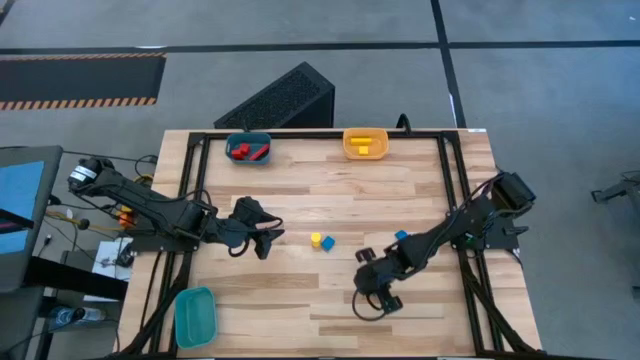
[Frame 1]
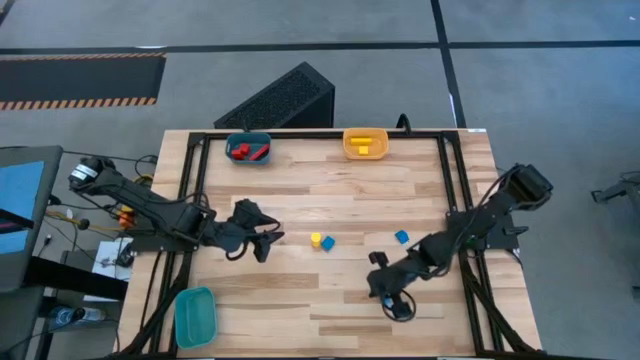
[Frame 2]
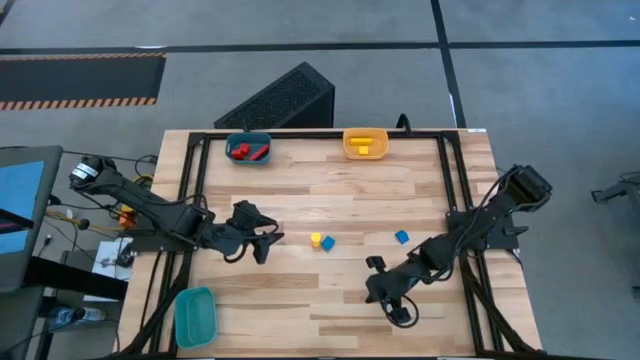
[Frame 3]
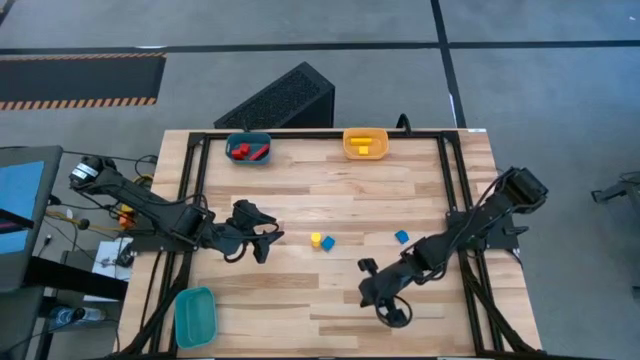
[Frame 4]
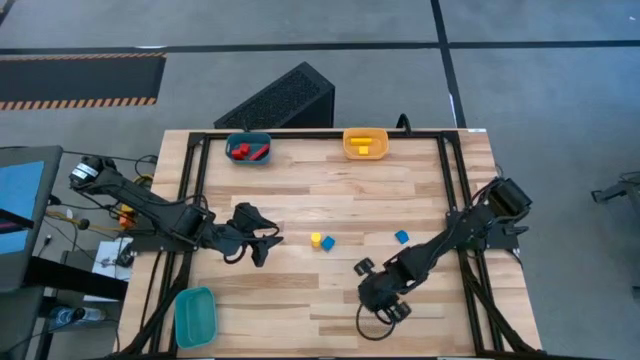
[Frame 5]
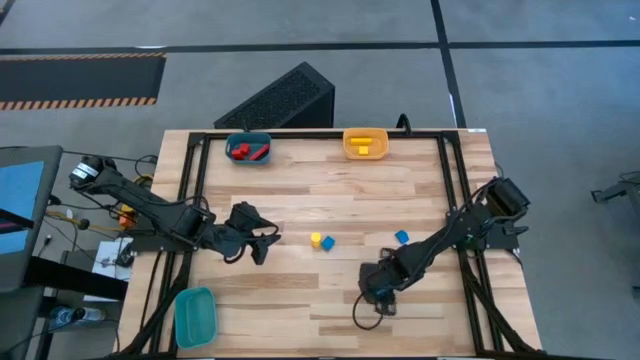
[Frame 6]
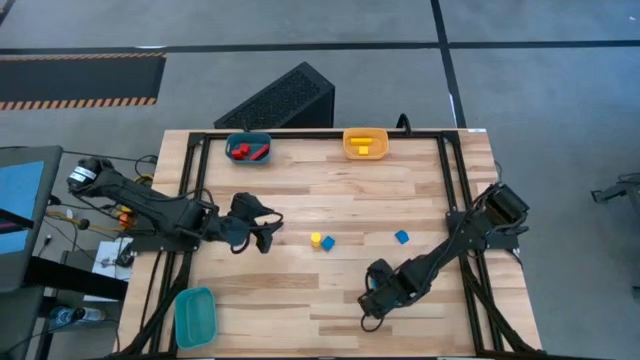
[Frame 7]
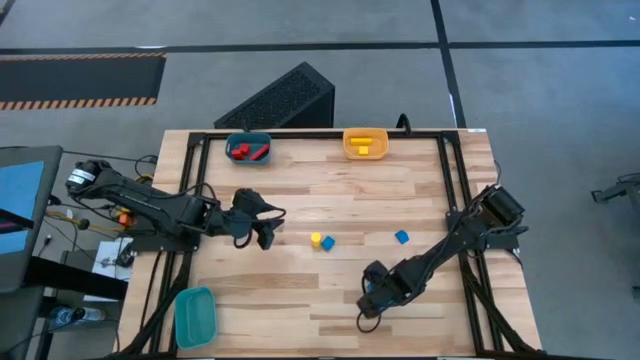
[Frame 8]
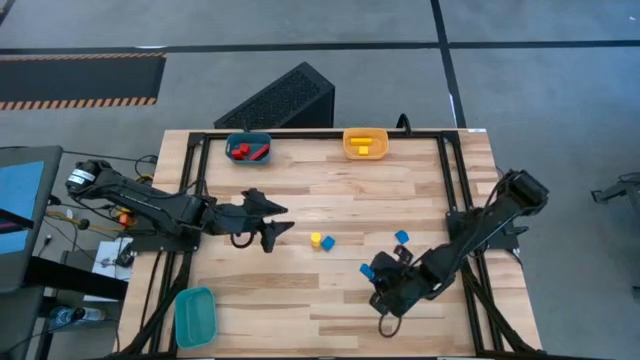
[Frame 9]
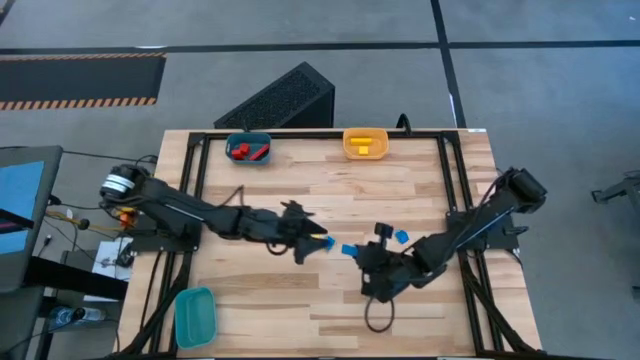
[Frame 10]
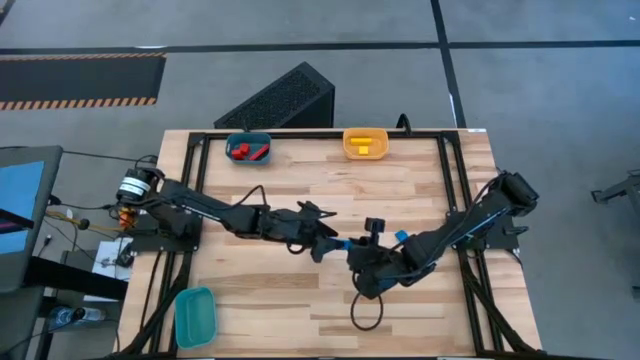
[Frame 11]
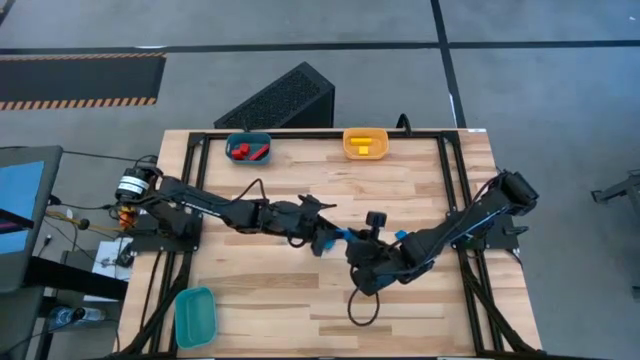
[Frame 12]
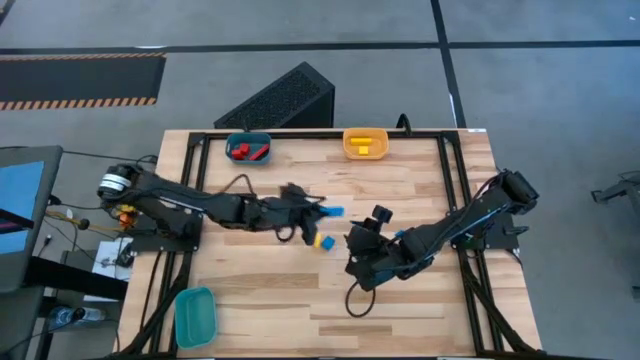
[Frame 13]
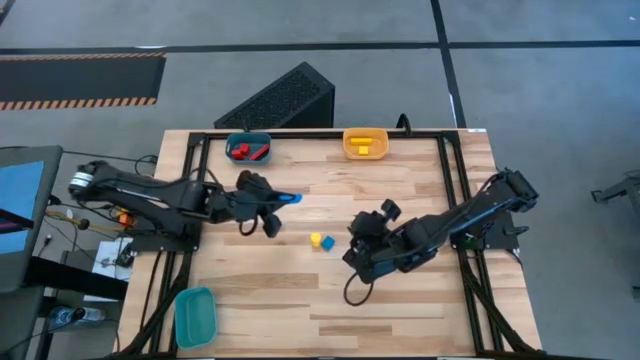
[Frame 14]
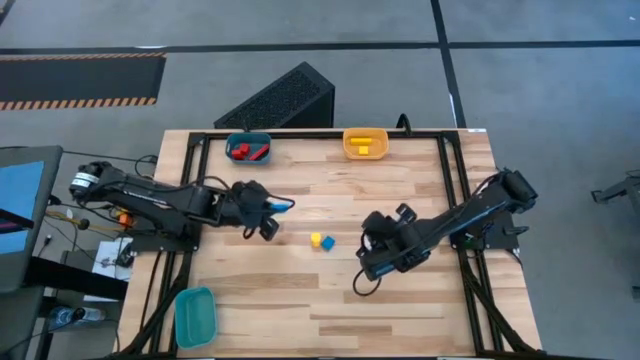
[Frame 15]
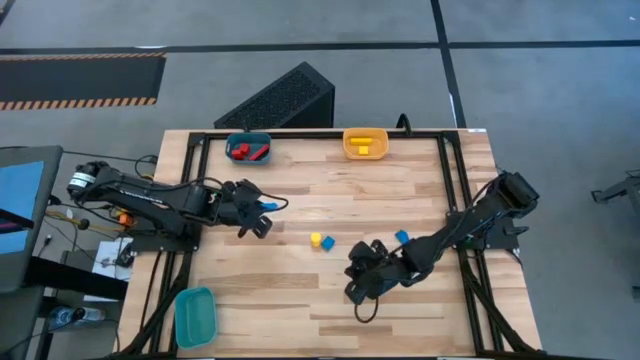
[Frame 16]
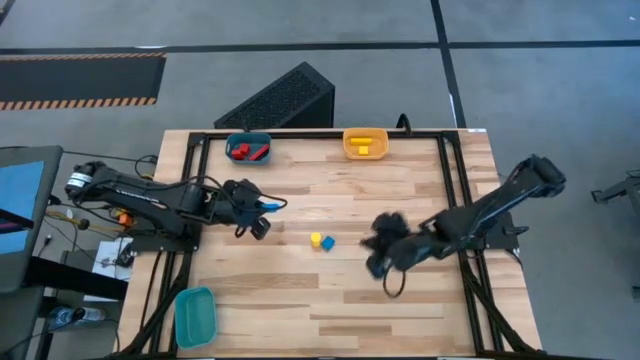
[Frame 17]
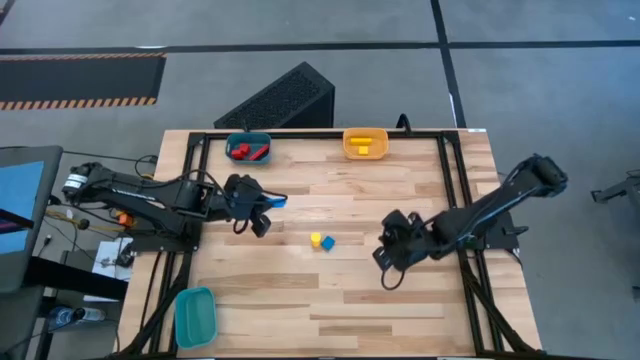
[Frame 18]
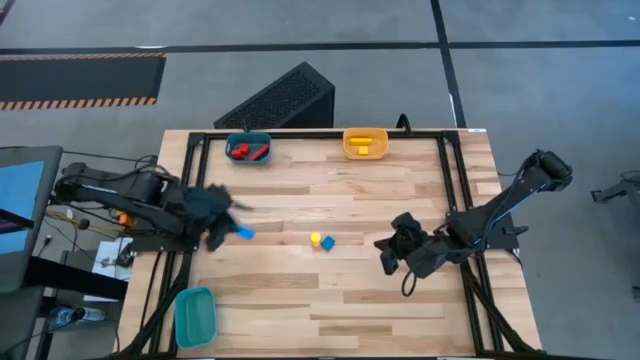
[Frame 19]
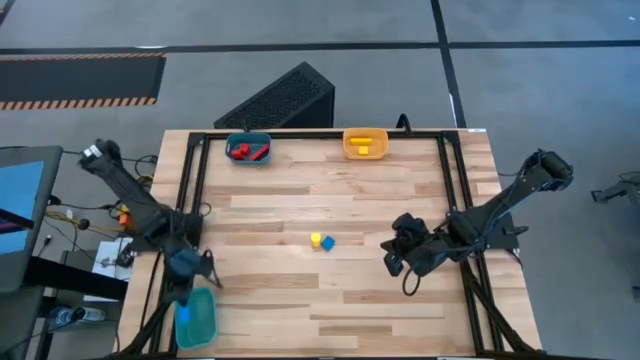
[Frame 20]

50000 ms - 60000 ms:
Task: Sort & place blocks by color
Put the bottom blue block into the green bin

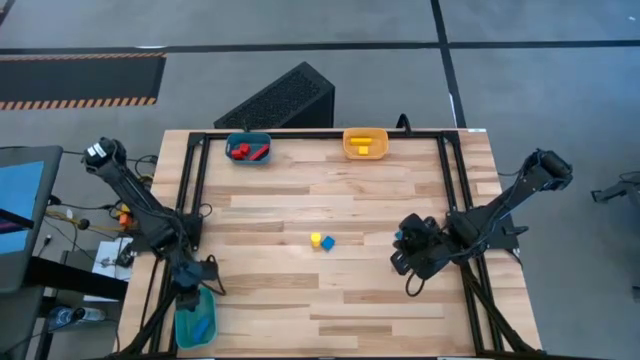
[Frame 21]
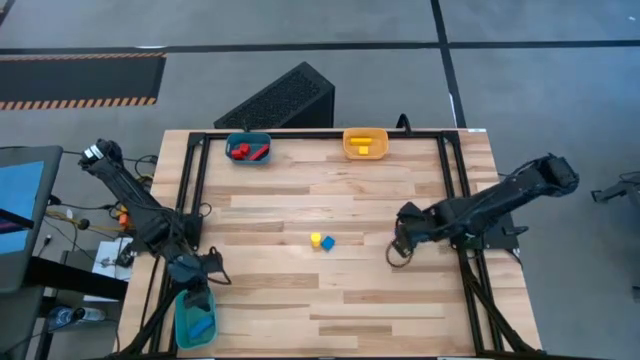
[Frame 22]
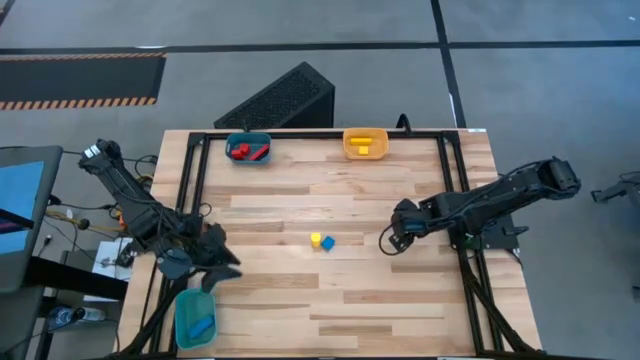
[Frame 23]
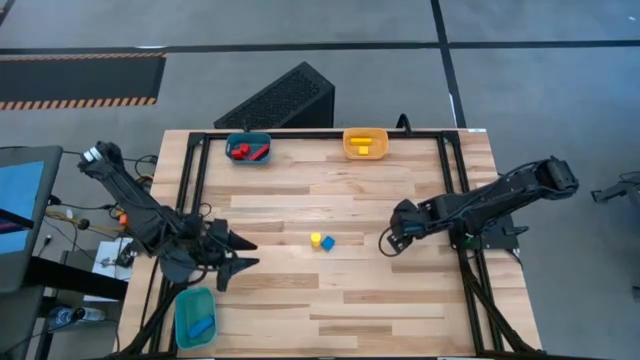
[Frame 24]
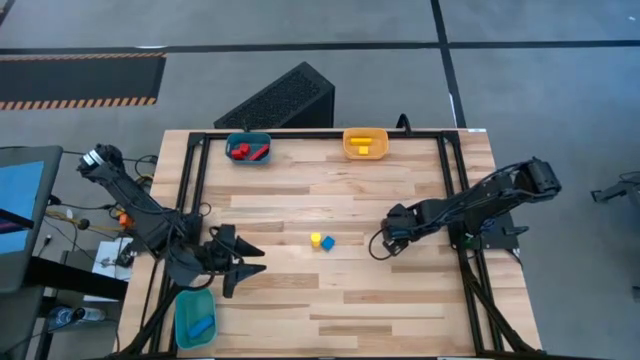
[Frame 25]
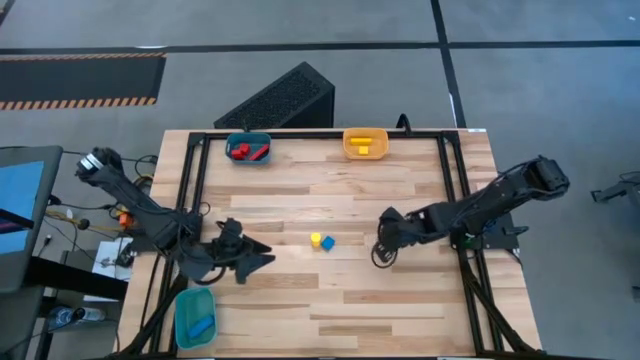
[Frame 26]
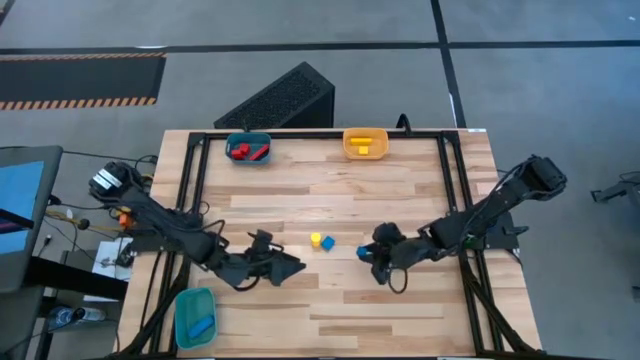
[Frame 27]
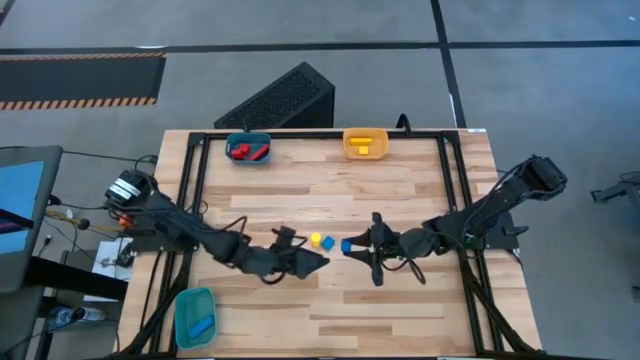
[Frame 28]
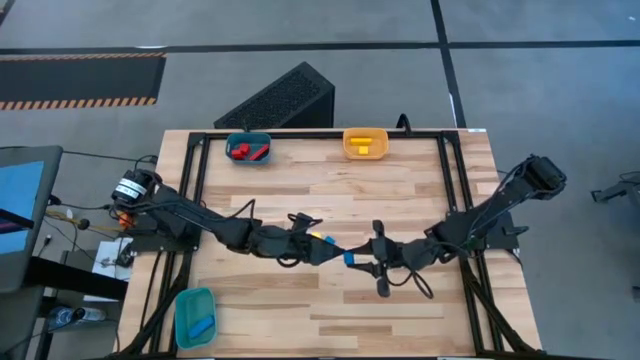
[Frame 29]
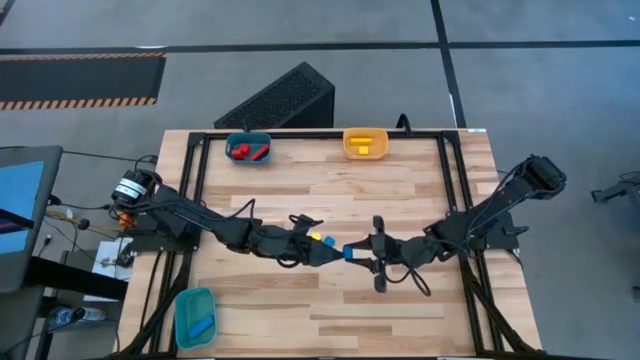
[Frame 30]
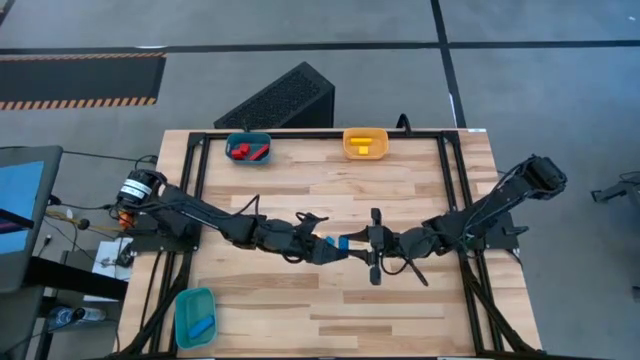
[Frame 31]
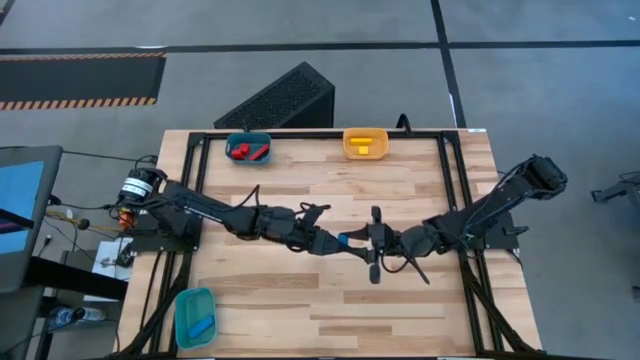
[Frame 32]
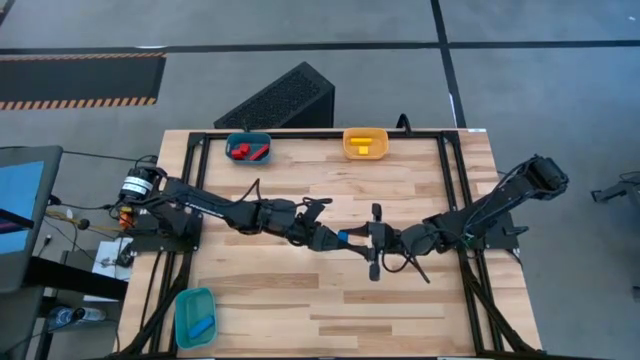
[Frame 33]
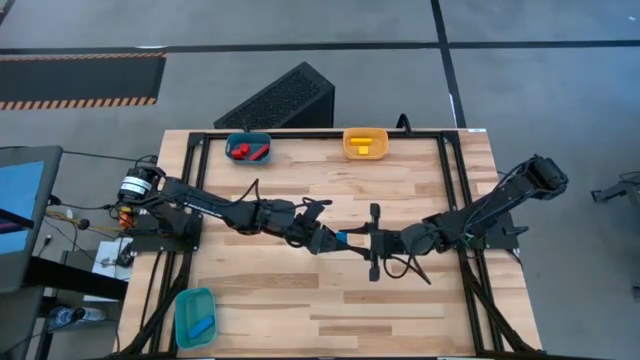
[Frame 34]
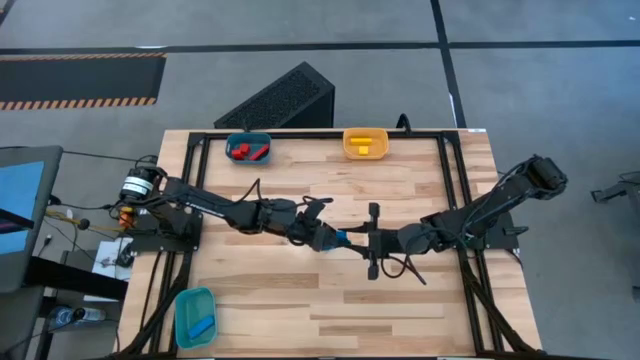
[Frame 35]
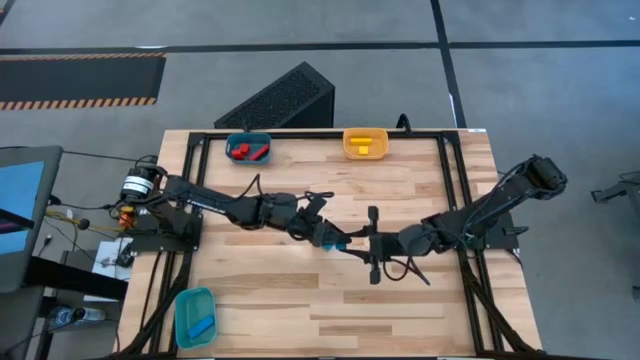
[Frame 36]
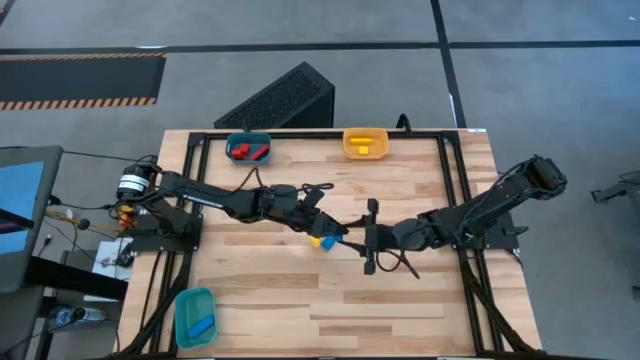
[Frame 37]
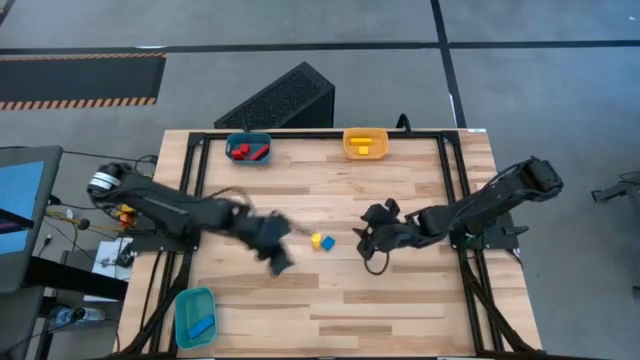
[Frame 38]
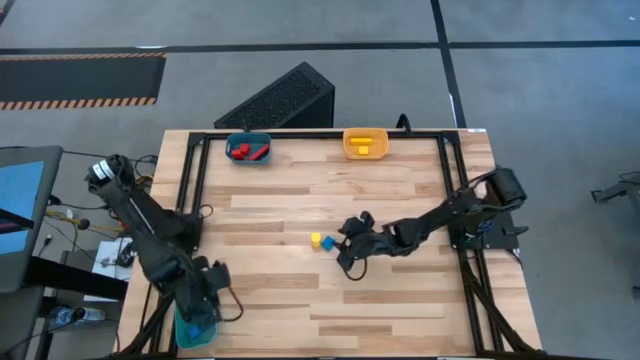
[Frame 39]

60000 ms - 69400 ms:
Put the right blue block into the green bin

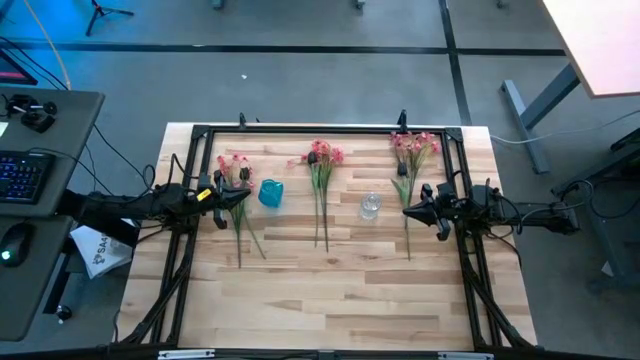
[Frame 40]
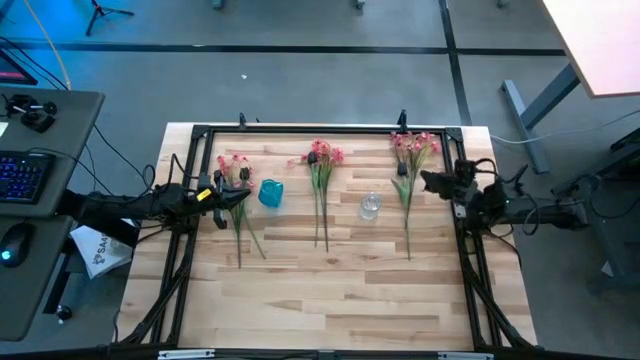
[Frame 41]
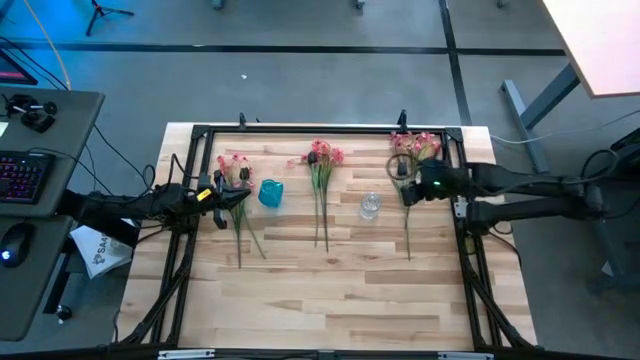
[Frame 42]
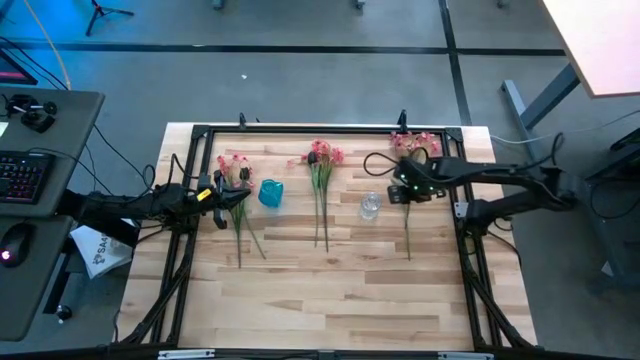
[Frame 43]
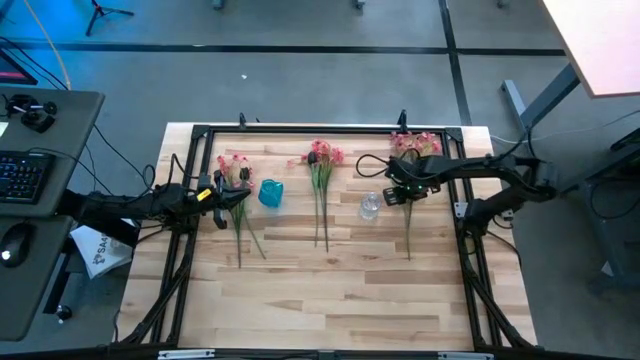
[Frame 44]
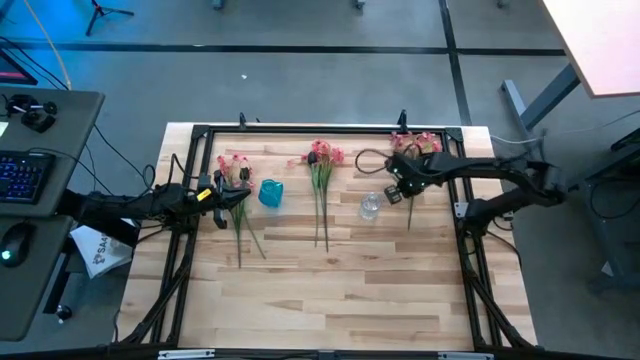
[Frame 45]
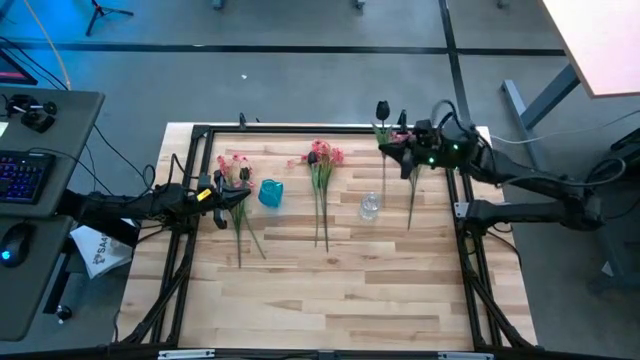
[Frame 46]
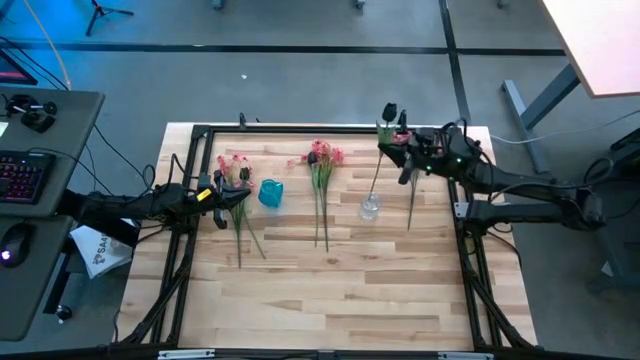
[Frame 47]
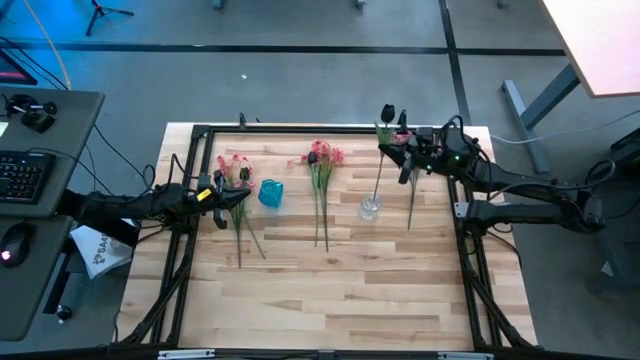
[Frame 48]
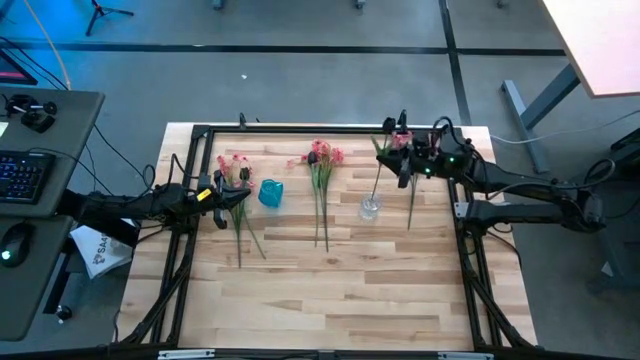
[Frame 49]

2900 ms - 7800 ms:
Task: Sort flowers into vase by color
Put the right black tulip flower into the transparent flower vase
